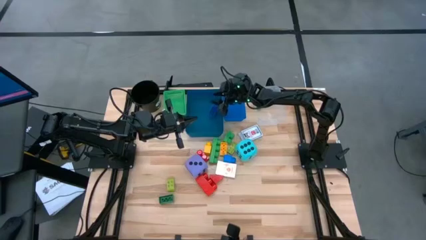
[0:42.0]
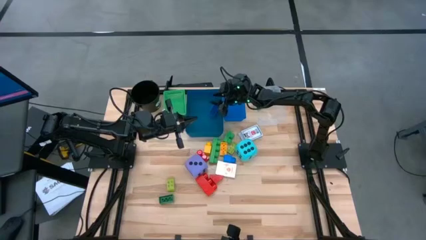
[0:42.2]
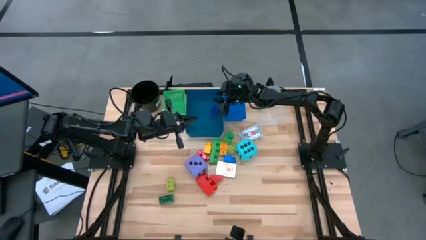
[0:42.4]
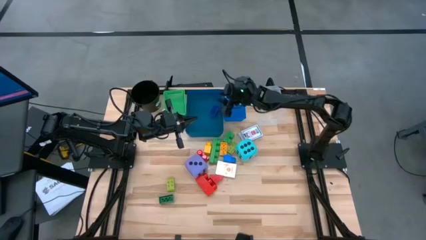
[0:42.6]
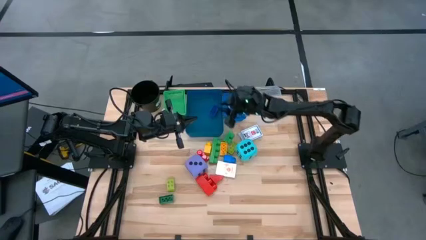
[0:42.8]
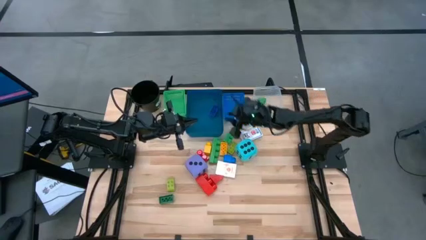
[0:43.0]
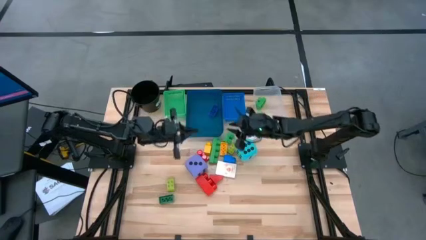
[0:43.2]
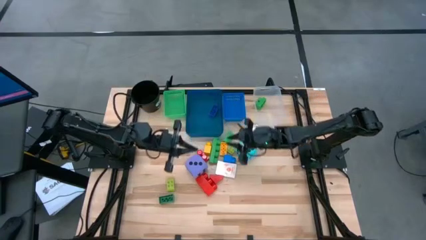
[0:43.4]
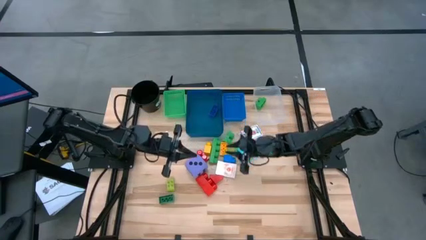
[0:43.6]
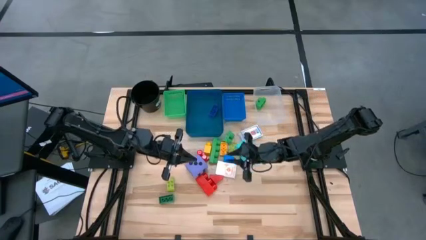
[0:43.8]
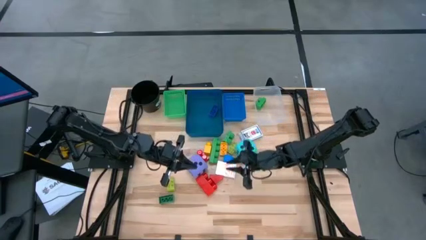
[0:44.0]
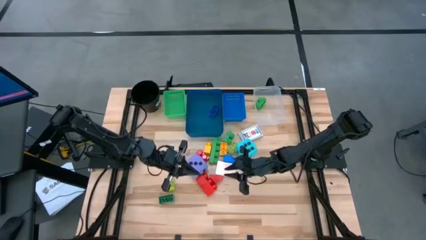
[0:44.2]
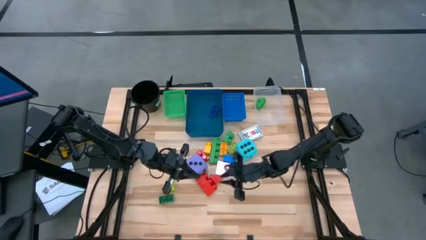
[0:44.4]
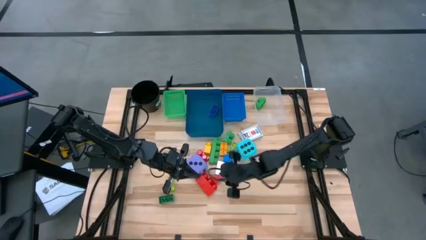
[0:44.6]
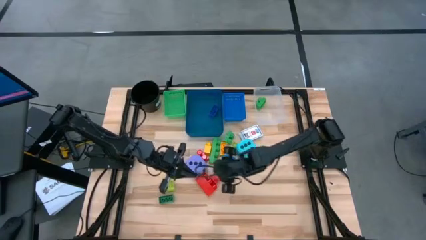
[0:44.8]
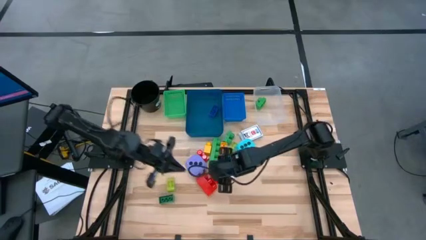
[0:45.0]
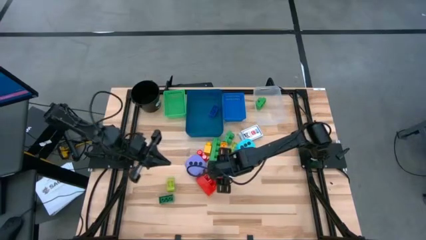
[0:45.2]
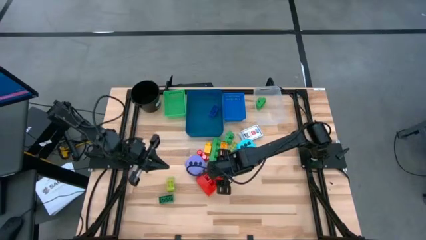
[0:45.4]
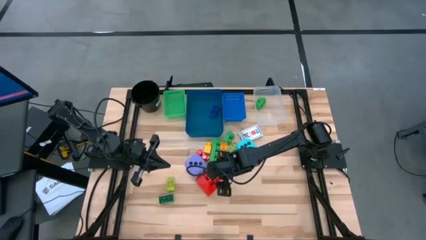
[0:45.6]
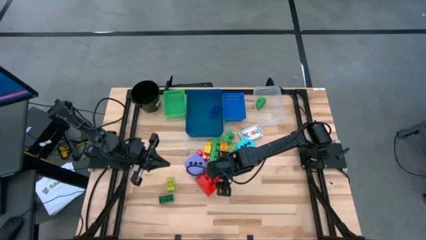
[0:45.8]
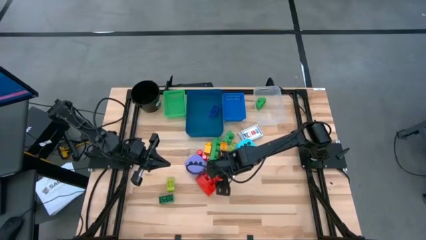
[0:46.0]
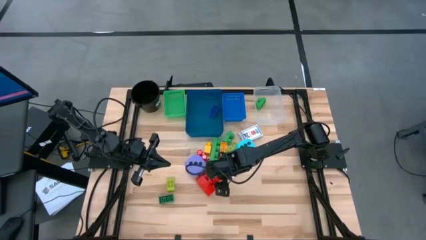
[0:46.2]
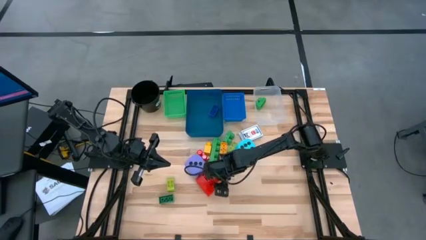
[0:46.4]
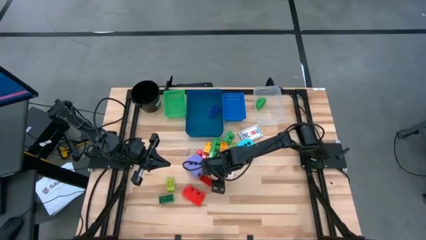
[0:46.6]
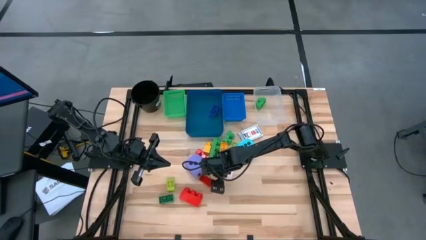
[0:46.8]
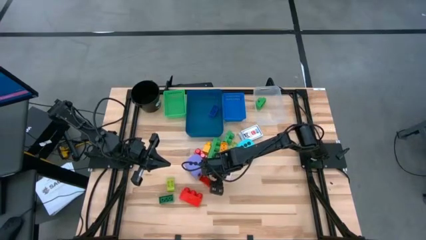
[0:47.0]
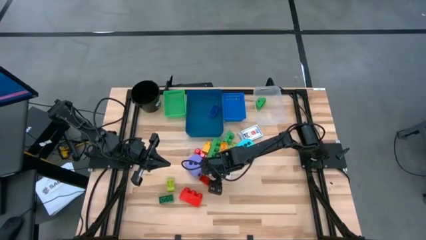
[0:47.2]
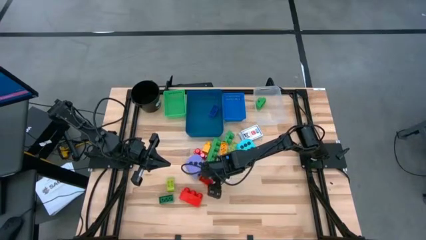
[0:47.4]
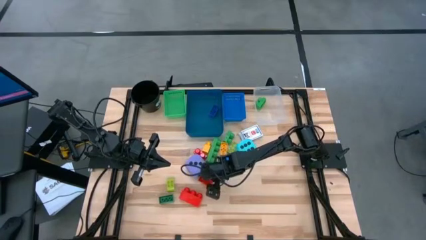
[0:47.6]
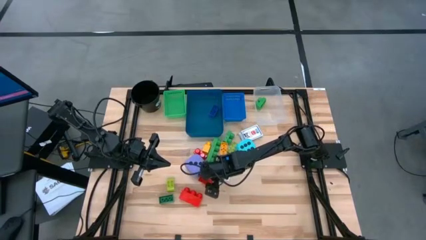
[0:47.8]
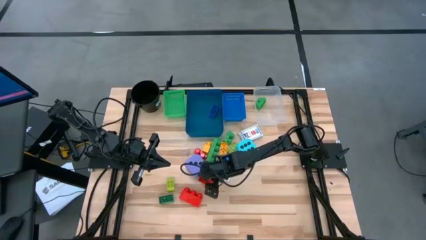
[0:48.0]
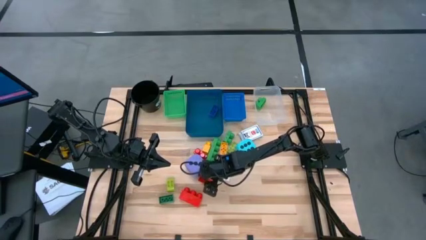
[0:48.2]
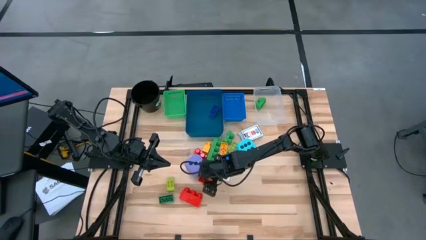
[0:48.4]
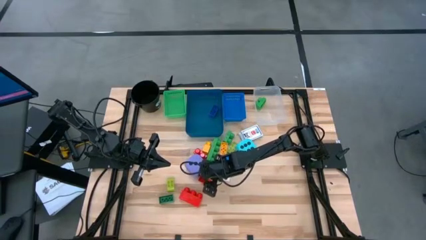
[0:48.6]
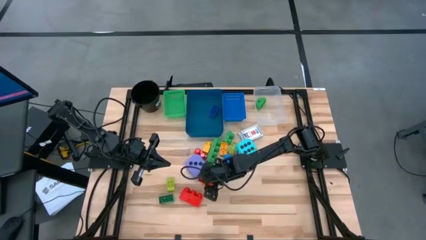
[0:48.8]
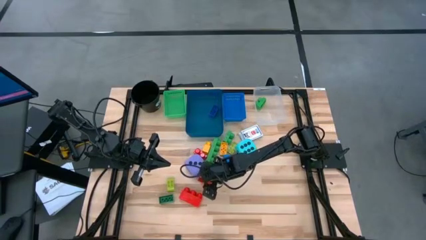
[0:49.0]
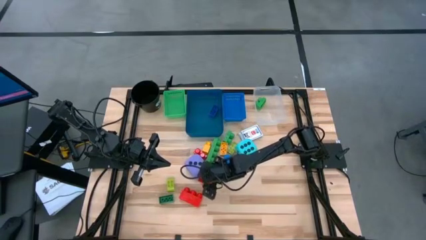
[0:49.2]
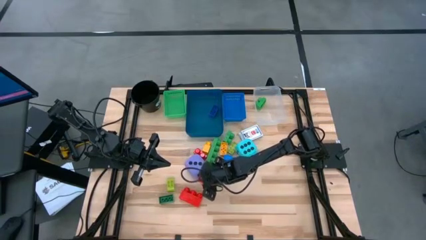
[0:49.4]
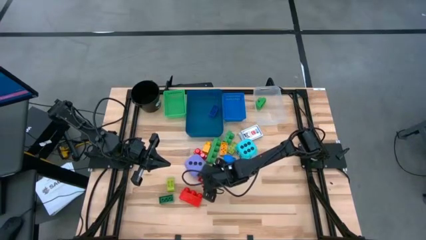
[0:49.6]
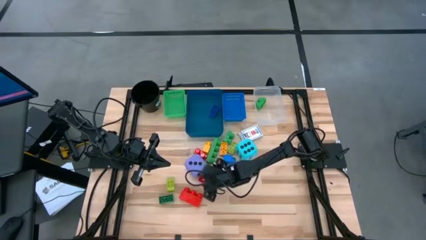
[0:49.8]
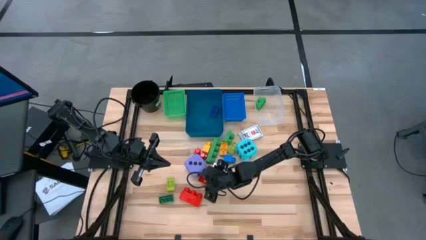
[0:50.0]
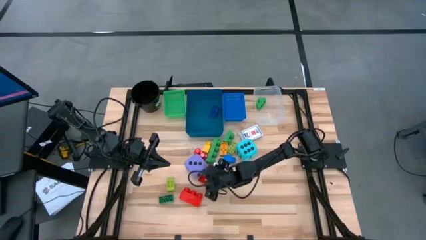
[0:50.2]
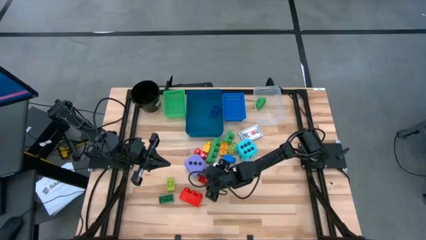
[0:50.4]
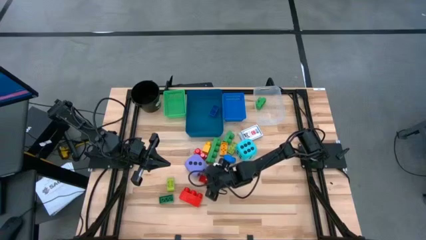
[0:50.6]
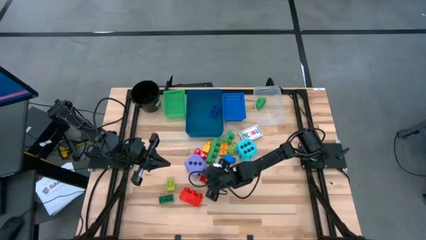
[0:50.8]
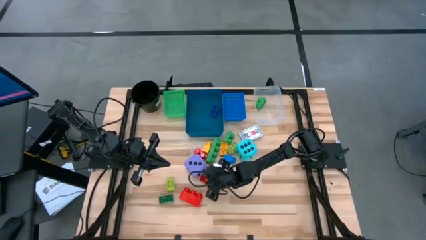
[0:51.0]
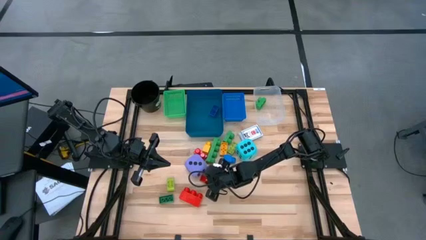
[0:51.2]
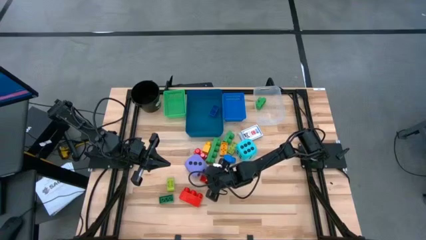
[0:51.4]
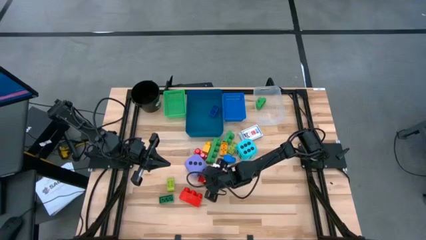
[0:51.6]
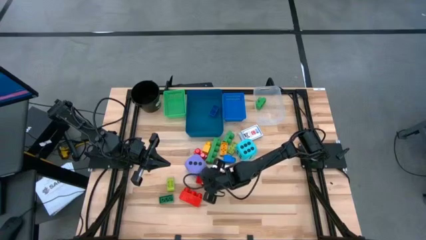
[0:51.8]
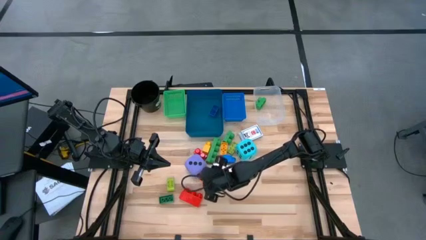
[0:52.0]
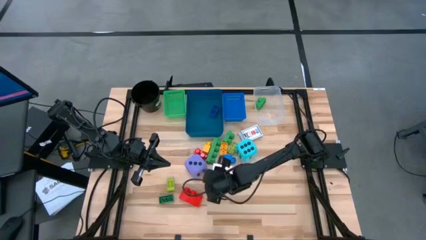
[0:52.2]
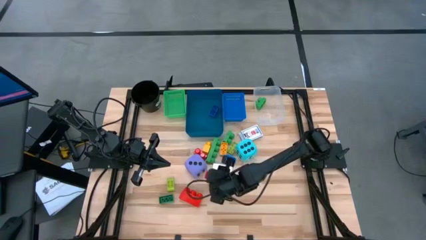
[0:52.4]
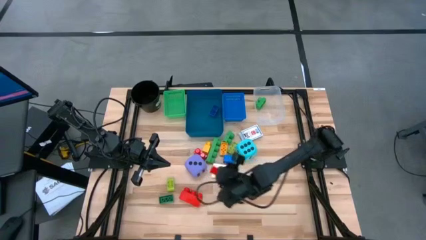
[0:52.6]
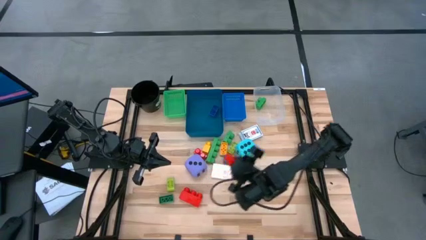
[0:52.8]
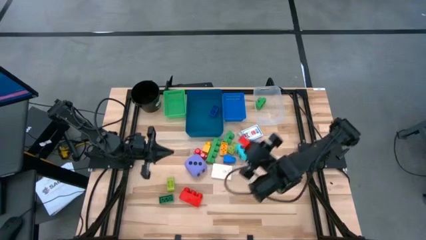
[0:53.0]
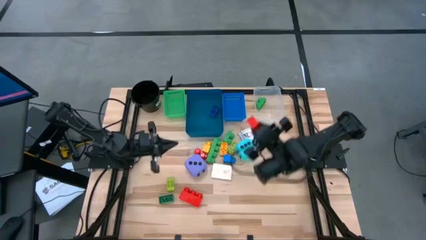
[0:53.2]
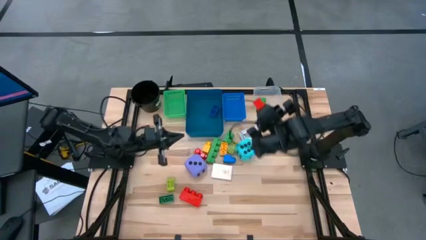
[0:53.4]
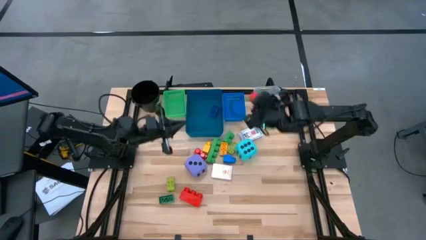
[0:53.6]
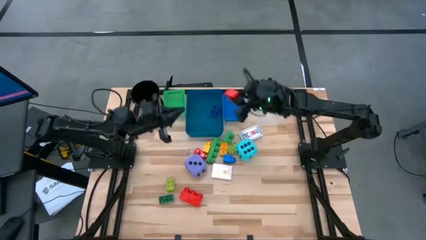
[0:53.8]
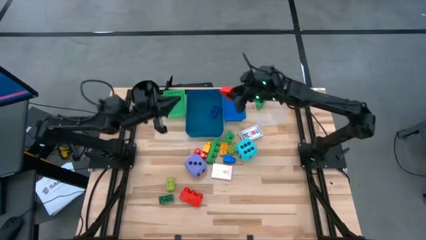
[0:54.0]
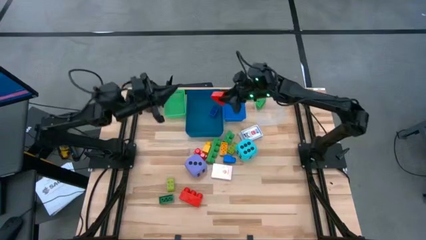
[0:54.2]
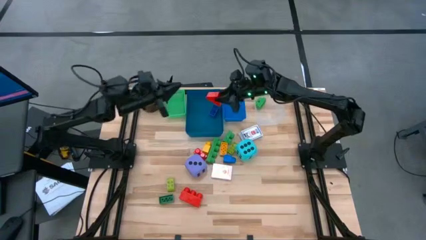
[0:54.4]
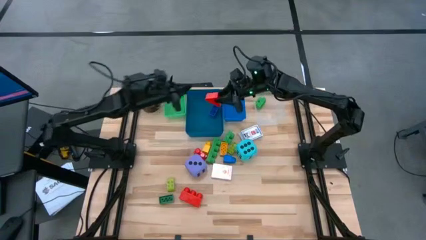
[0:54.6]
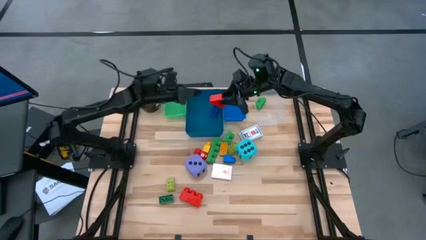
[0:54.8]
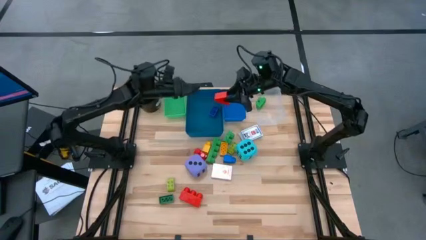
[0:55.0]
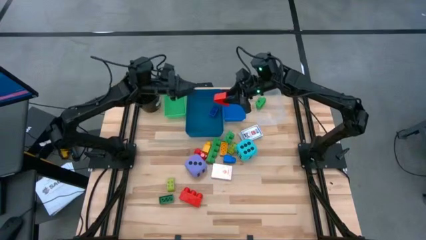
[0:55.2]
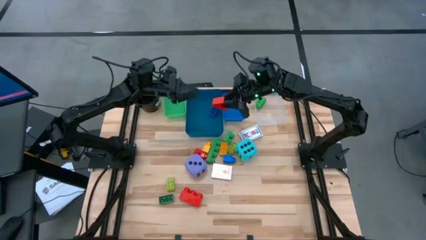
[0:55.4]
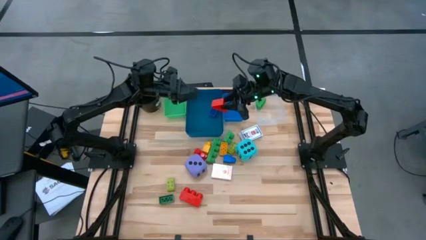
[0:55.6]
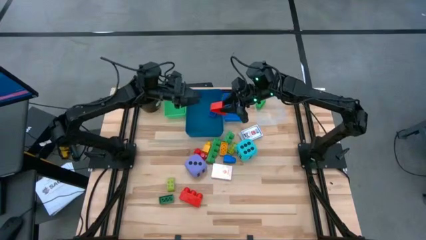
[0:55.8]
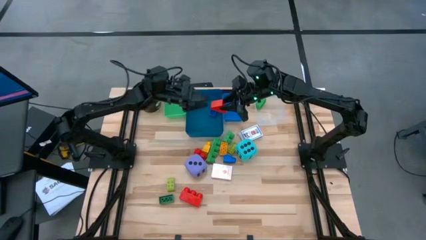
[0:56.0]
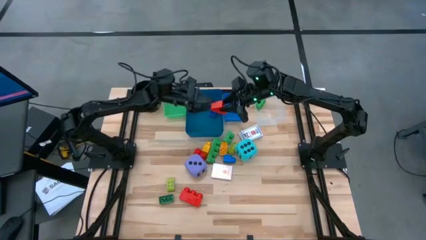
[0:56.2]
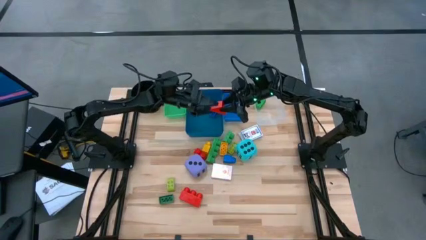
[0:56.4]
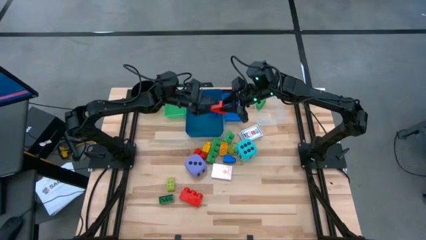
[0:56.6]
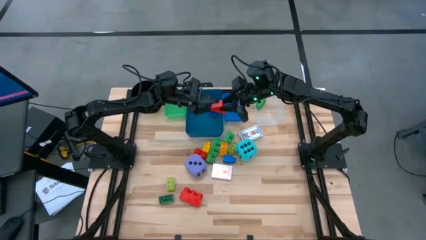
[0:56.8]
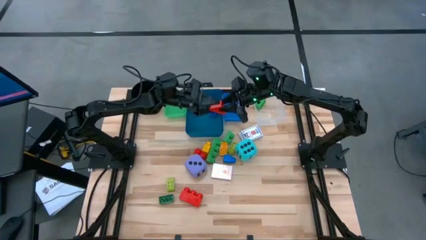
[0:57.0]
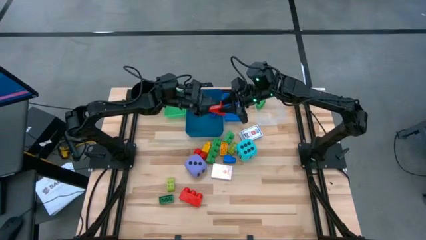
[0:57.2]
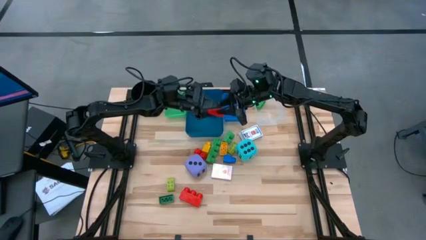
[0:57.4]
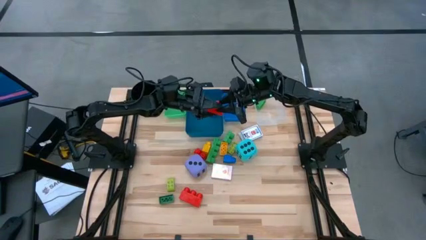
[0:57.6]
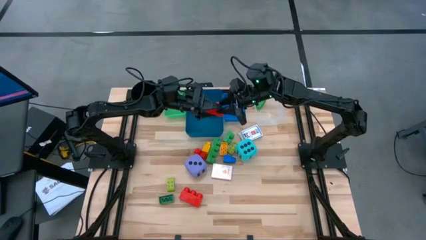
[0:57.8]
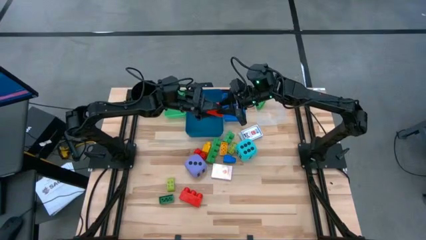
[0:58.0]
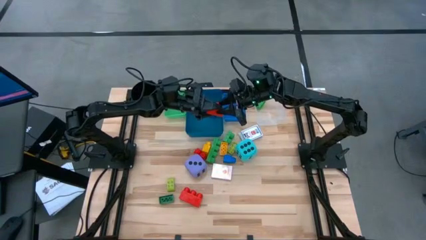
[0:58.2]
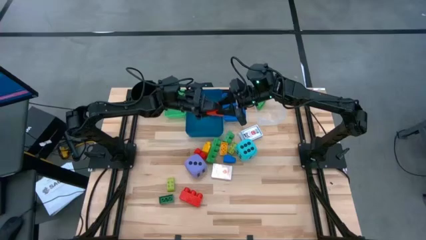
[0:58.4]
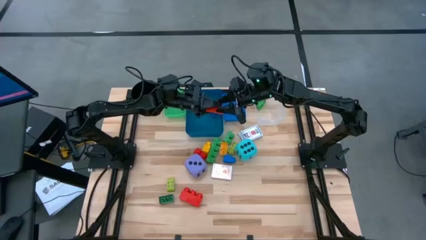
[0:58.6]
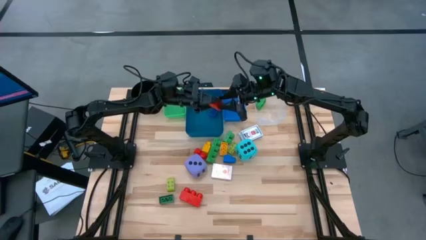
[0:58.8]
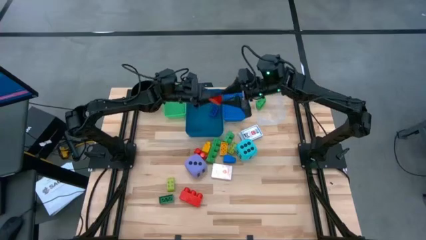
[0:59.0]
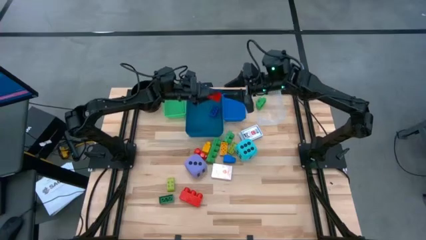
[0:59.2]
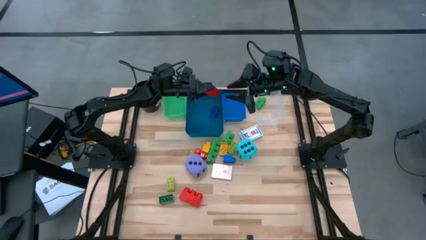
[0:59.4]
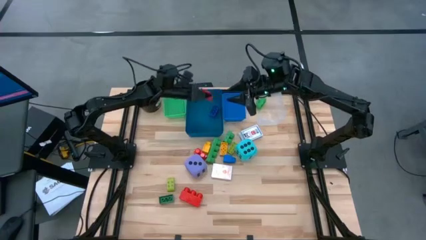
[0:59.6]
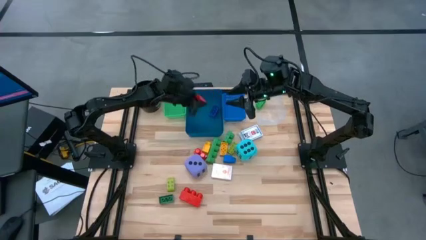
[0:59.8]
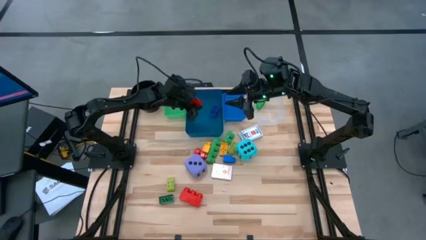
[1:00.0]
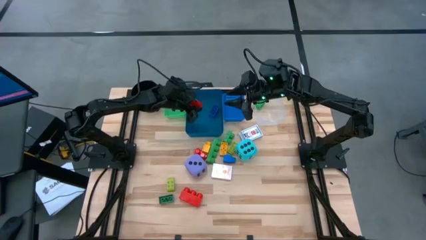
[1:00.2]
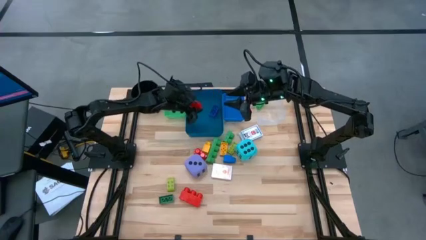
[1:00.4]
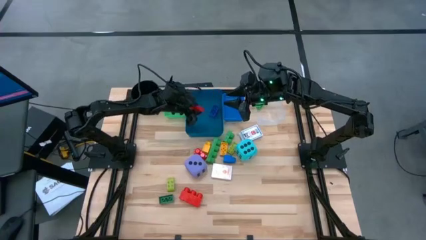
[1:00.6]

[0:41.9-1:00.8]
Task: Pick & Place Toys
Put the small red game piece into the dark blue bin
